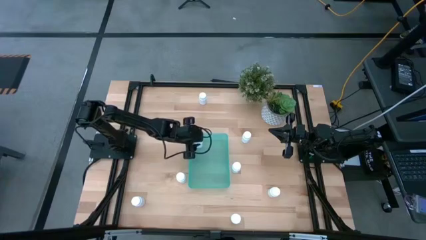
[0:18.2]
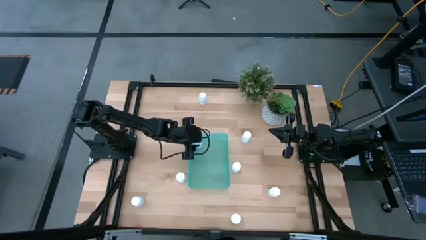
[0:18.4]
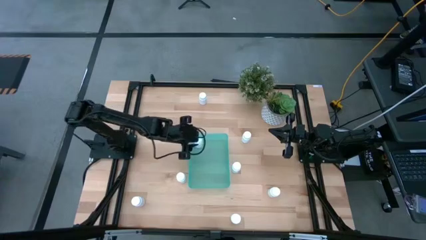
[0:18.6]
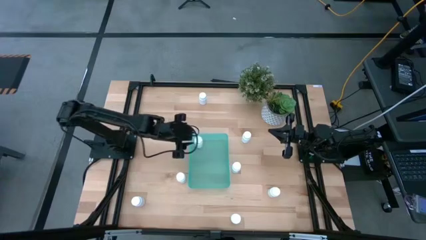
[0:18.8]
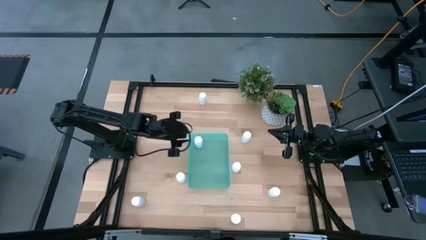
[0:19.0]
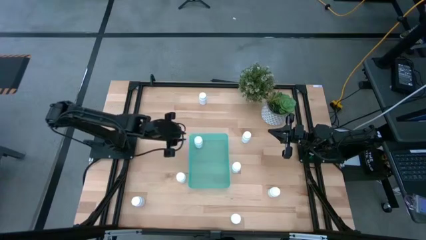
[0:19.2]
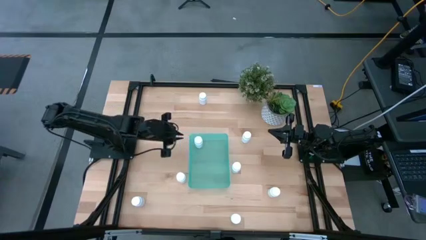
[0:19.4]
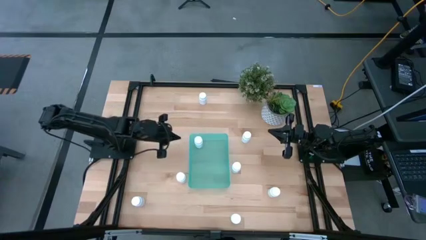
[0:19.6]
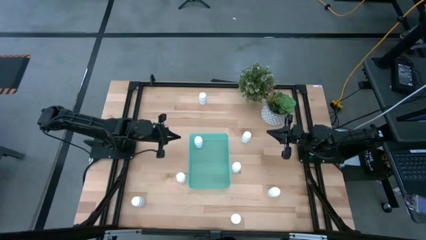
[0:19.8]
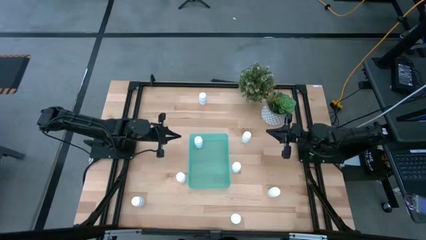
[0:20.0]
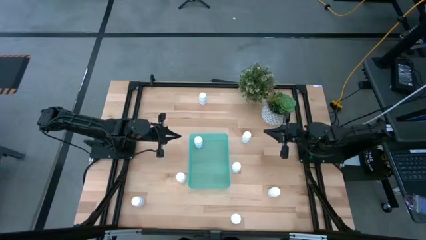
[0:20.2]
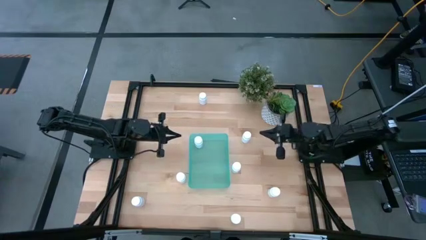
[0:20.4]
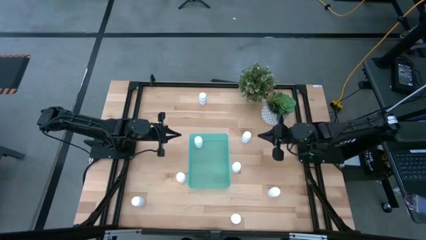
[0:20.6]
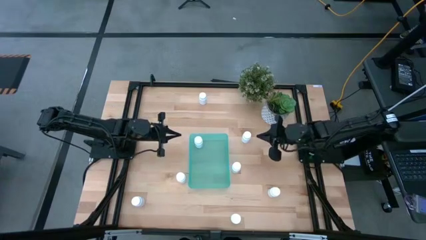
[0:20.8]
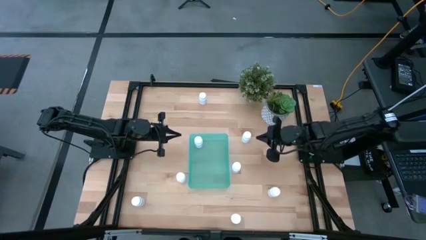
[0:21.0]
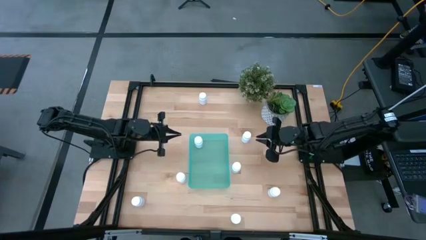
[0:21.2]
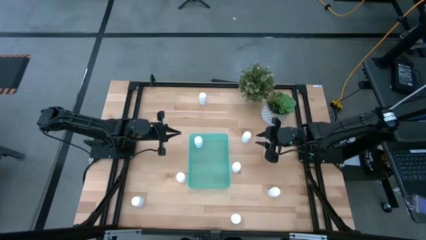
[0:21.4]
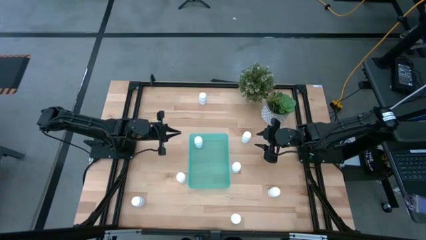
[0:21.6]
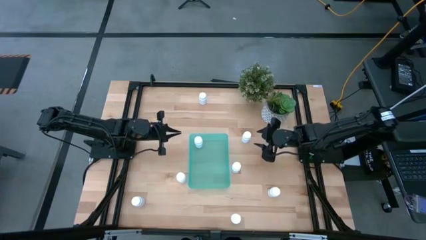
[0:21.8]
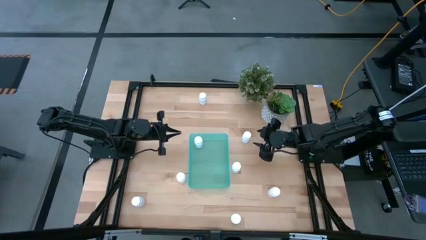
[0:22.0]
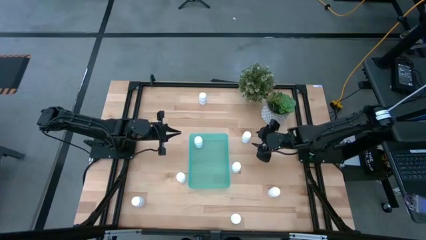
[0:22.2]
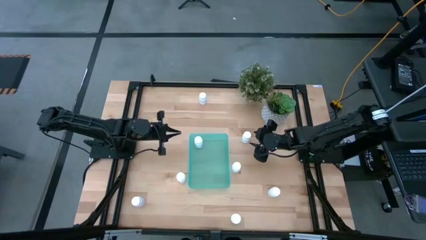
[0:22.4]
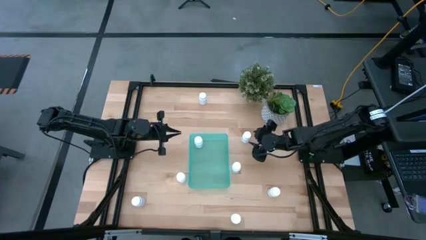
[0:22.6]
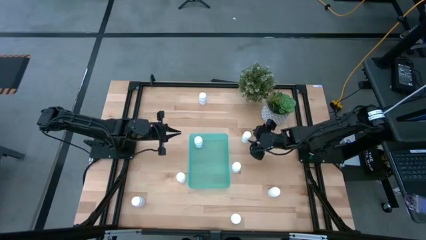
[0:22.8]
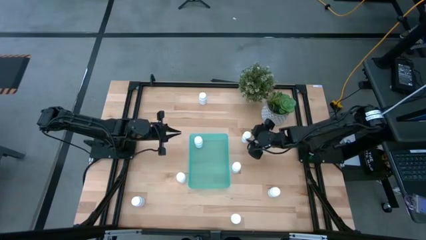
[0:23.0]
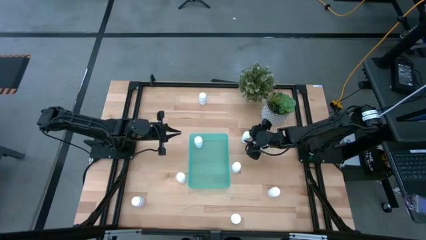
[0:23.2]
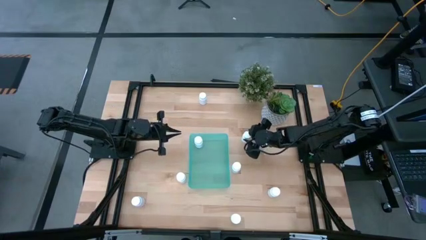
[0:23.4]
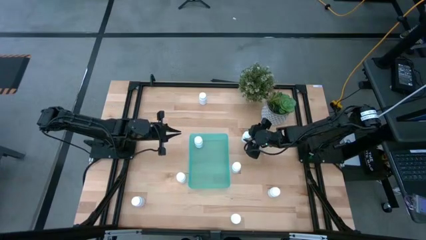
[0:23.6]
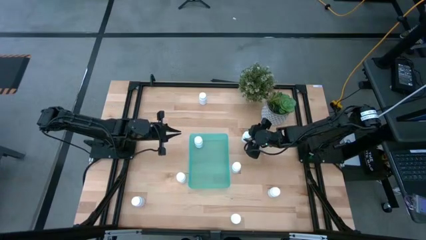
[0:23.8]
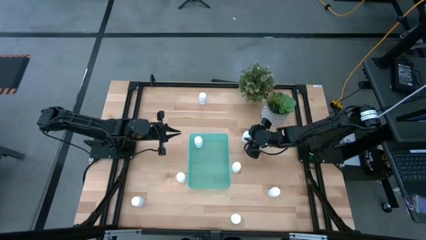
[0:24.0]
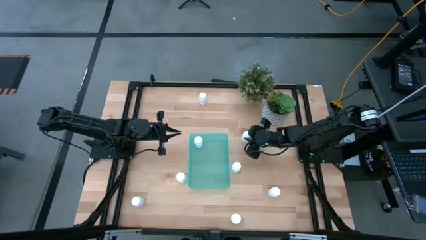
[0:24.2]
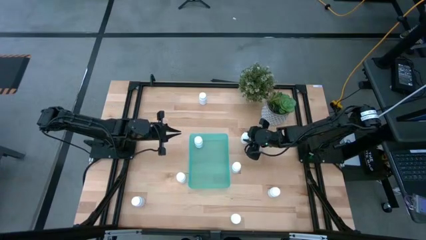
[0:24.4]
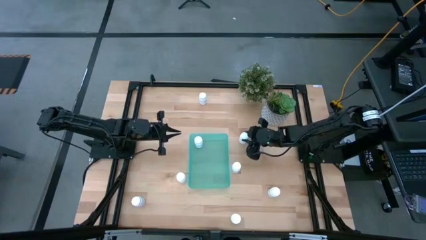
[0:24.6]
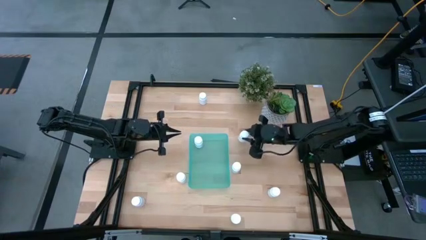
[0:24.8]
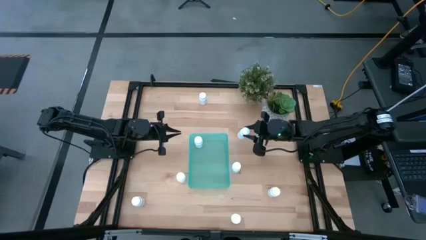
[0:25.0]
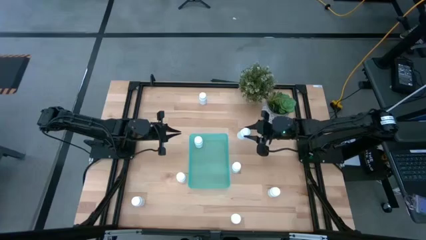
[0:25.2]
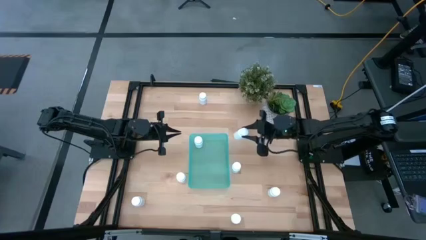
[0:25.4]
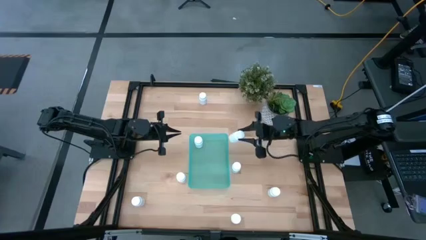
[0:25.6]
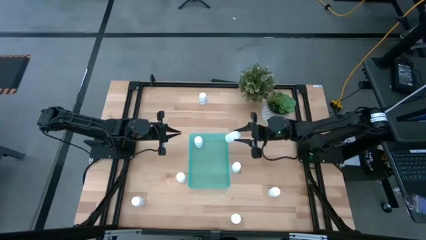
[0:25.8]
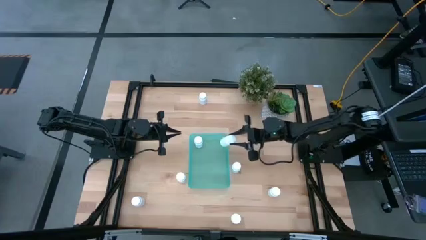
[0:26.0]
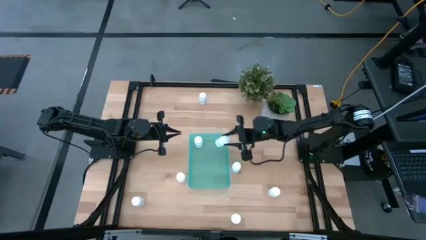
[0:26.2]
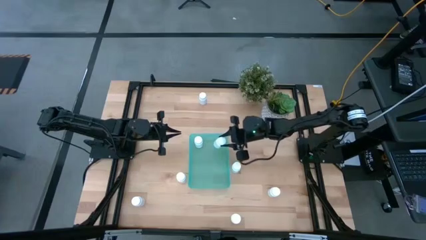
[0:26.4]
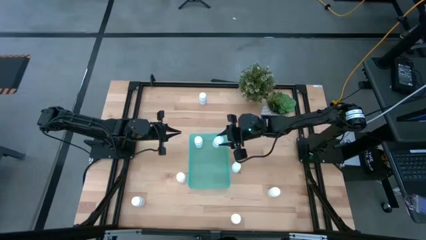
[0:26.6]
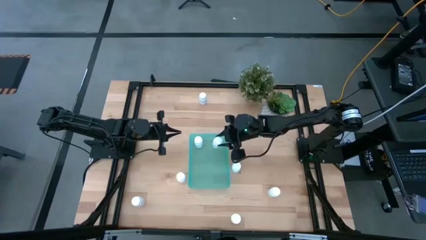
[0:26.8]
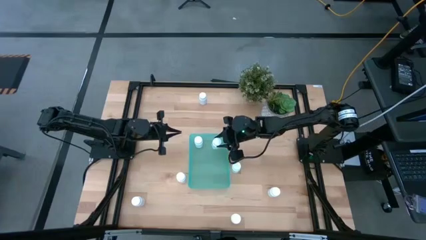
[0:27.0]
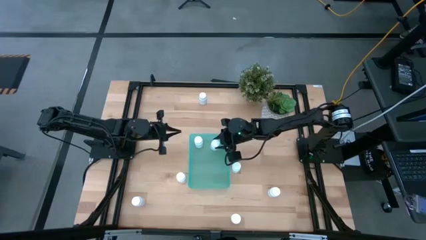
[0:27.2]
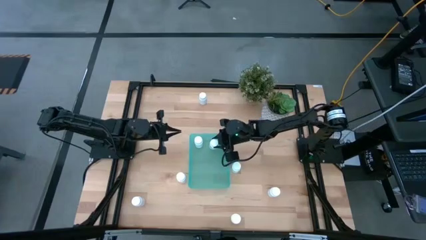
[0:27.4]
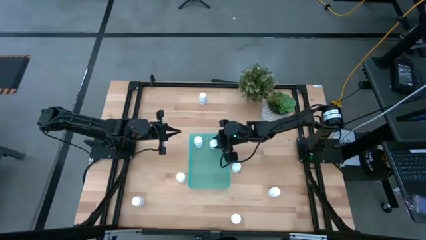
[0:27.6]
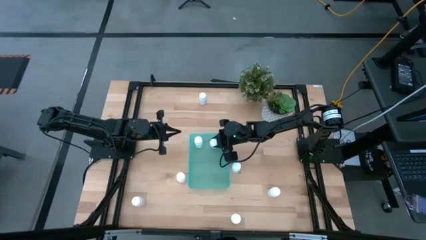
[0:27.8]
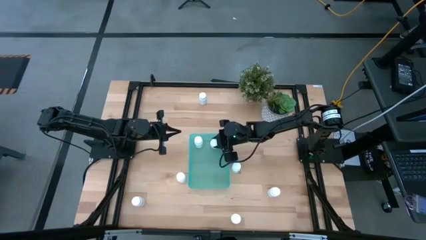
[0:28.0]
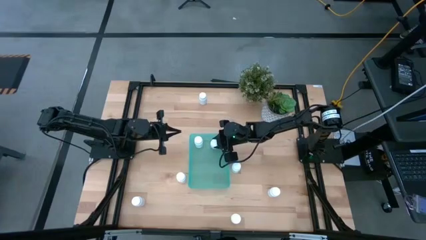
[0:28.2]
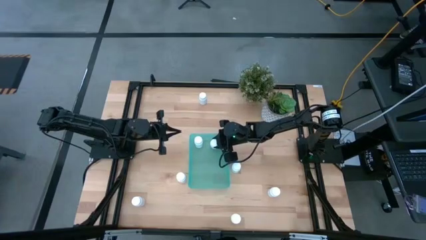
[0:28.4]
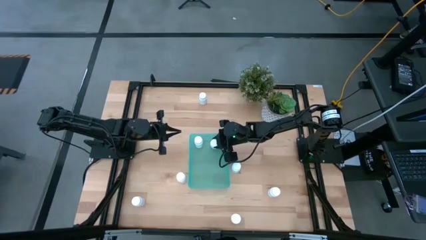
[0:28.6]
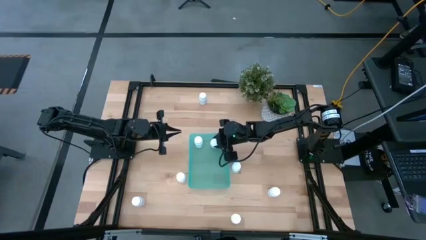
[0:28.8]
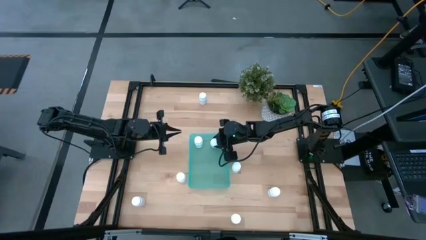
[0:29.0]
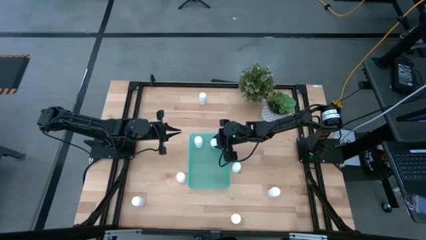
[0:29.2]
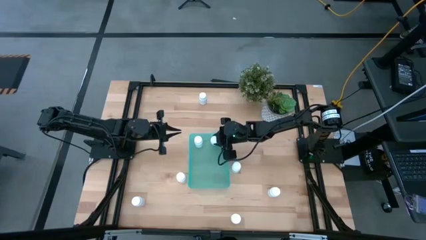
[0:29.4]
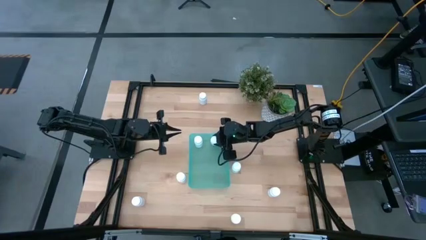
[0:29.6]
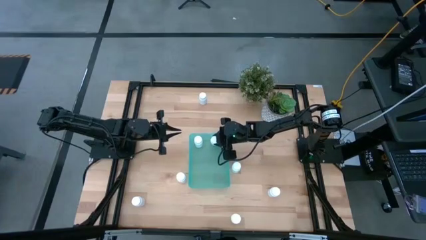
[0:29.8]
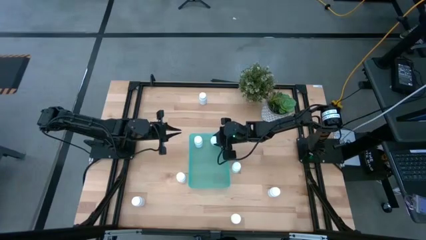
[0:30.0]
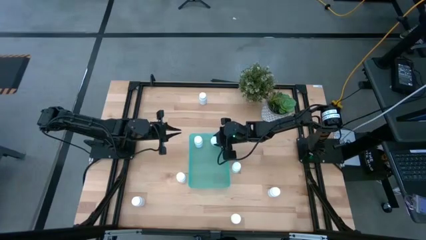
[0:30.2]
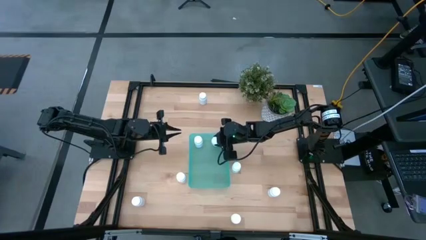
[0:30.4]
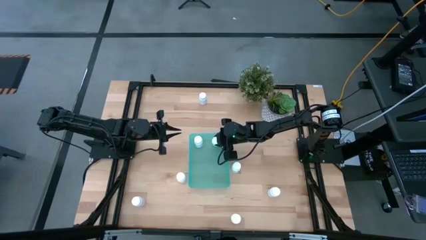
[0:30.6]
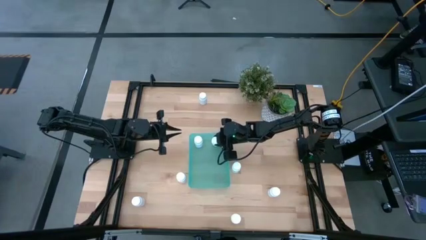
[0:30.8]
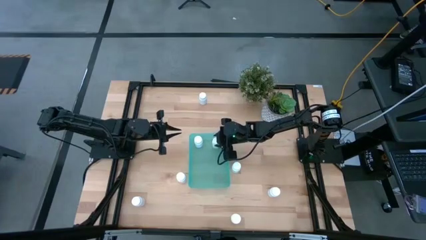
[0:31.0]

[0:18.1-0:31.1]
Task: Pick and place pill bottles into a basket
Put the white pill bottle into the green bin

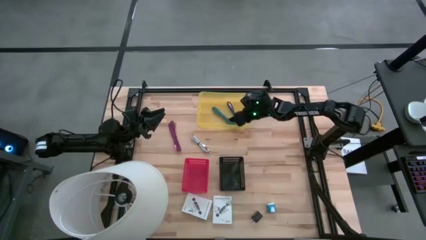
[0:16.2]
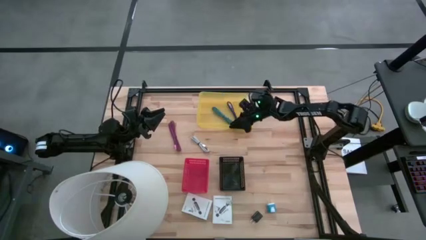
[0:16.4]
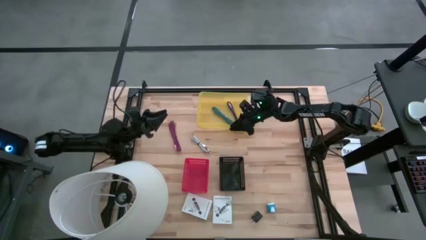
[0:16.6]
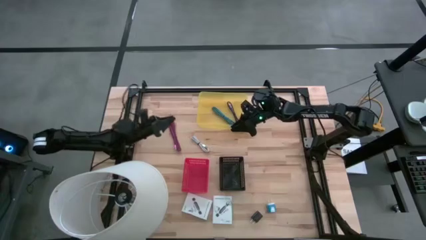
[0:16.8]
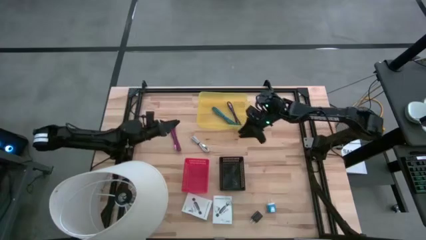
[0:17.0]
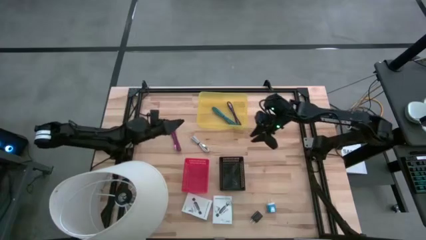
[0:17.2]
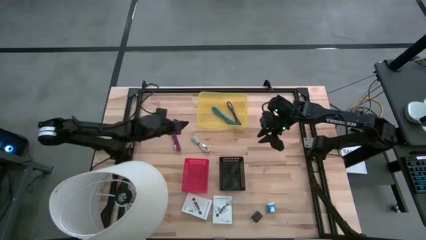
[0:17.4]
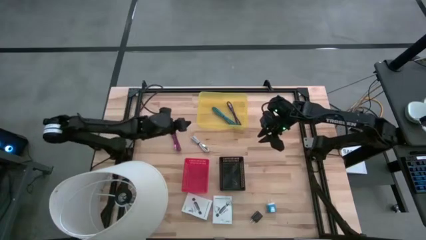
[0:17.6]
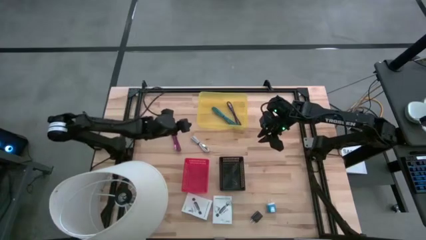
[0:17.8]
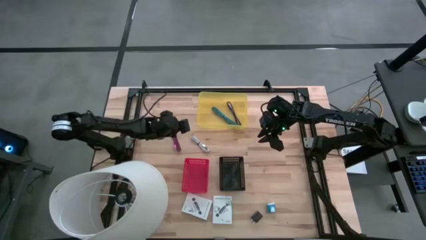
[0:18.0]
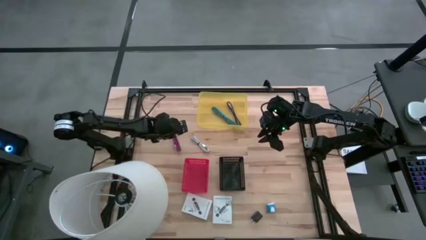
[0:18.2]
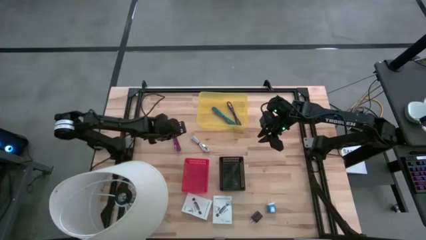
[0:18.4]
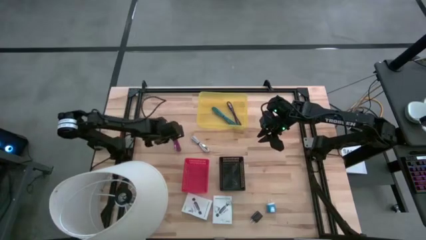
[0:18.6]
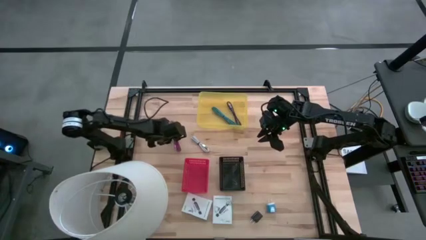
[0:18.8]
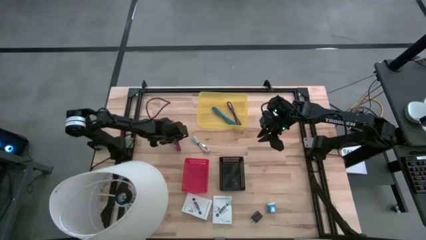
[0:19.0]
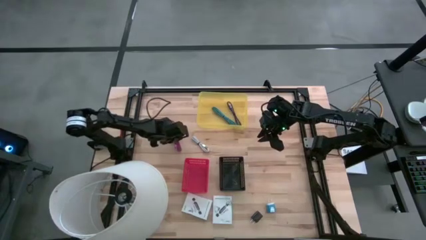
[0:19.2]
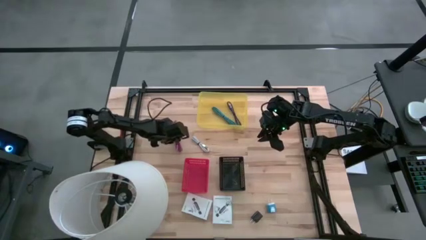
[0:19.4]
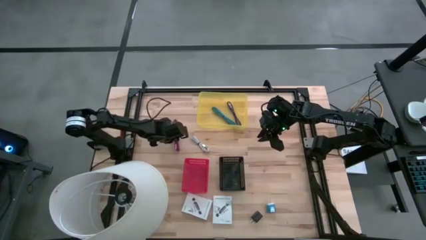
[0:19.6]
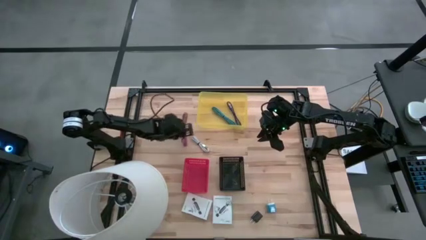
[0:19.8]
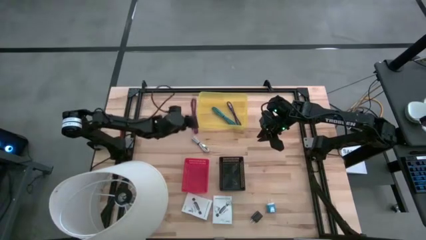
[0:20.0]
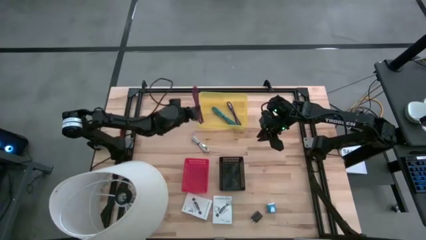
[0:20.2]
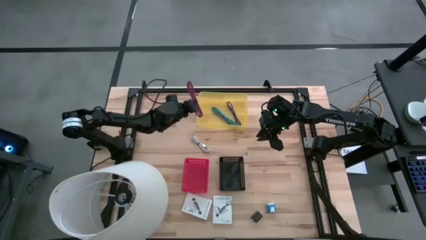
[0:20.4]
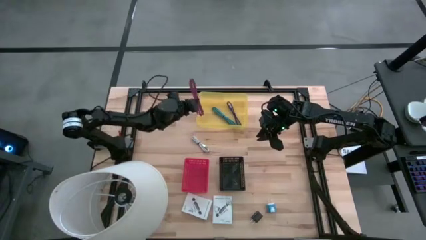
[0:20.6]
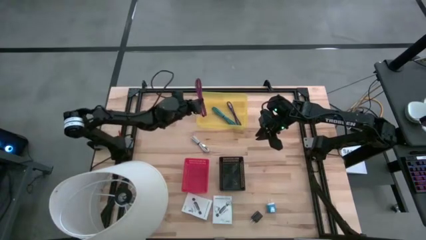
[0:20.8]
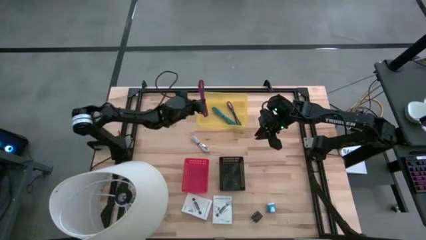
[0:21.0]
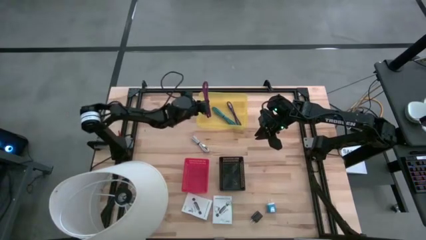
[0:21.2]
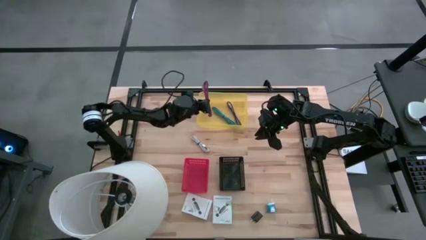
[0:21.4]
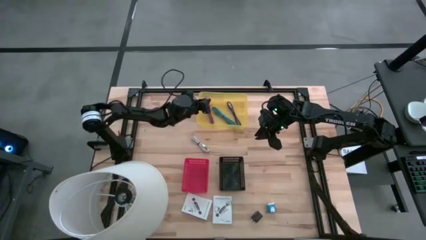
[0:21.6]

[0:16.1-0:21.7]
Task: Pick and place items into bin
Put the pink usb cable into the yellow bin
